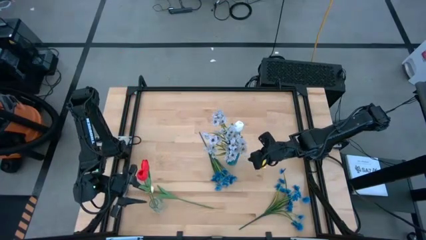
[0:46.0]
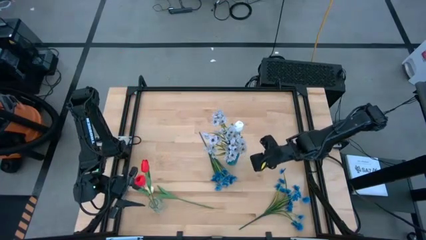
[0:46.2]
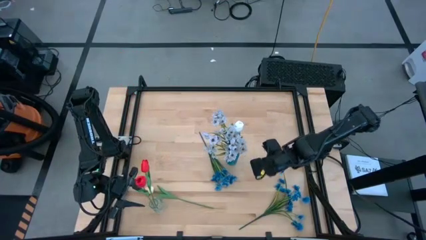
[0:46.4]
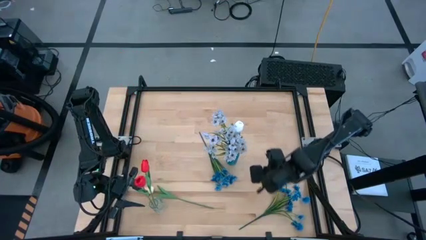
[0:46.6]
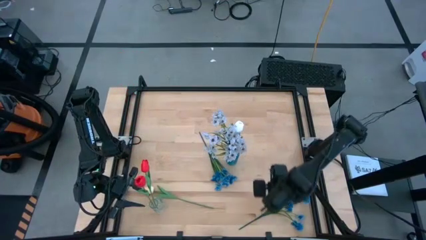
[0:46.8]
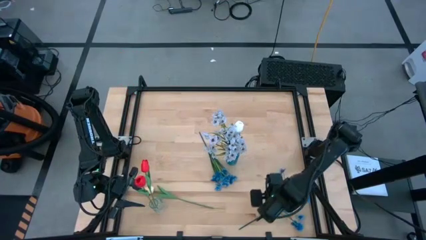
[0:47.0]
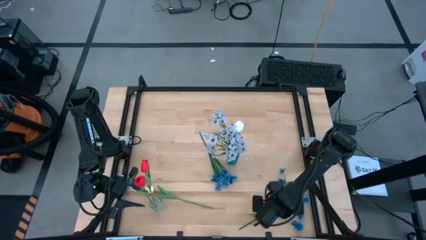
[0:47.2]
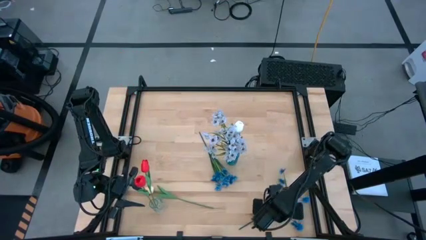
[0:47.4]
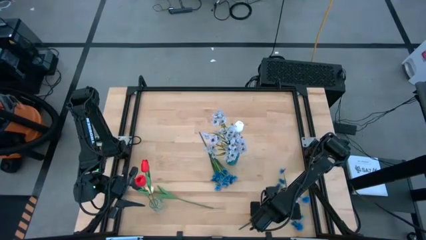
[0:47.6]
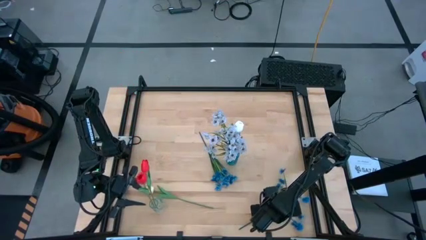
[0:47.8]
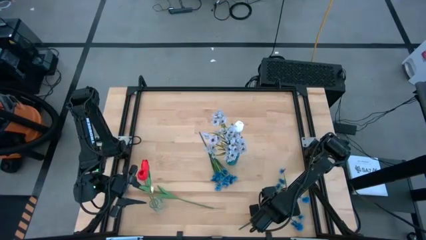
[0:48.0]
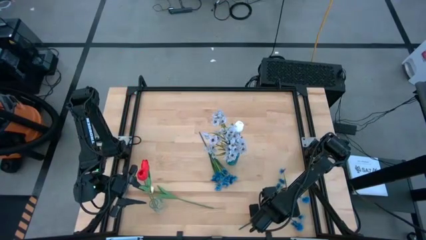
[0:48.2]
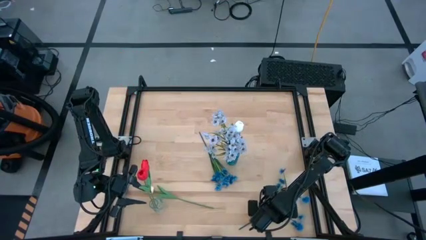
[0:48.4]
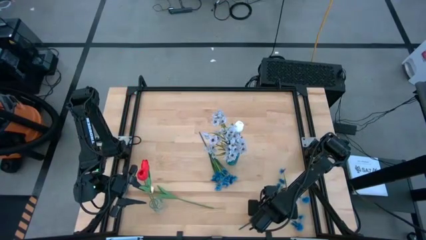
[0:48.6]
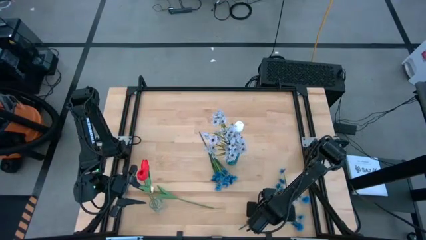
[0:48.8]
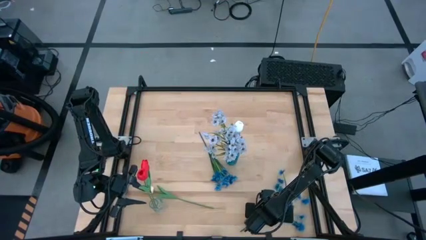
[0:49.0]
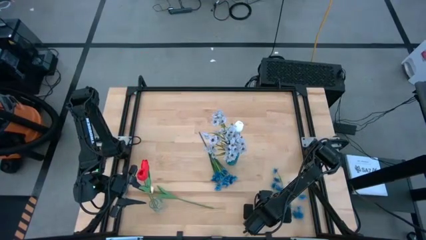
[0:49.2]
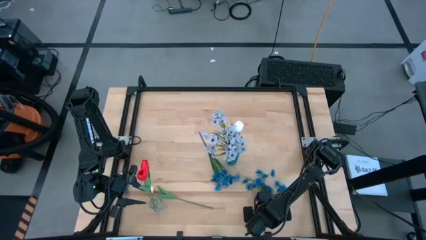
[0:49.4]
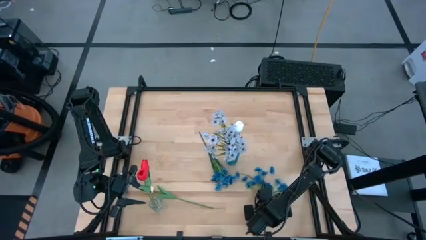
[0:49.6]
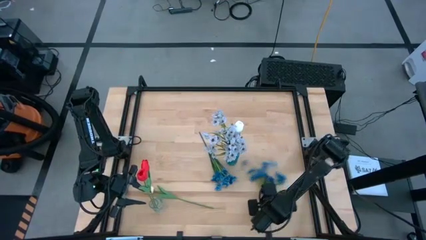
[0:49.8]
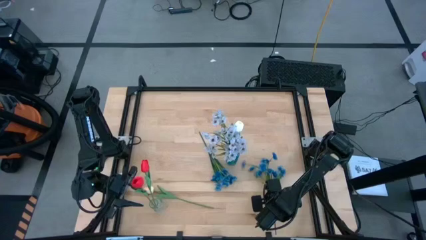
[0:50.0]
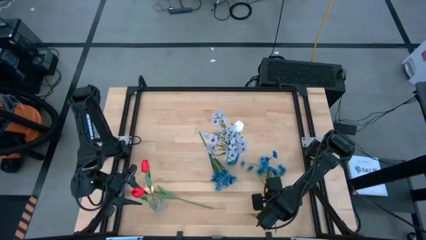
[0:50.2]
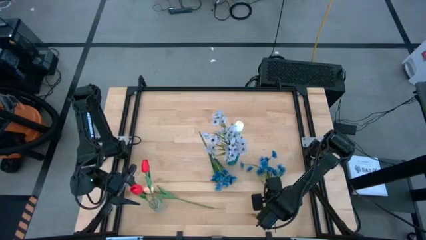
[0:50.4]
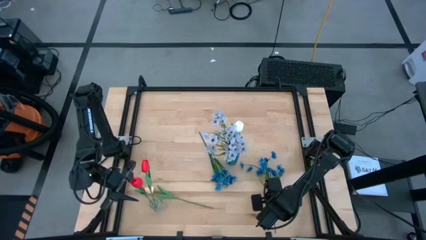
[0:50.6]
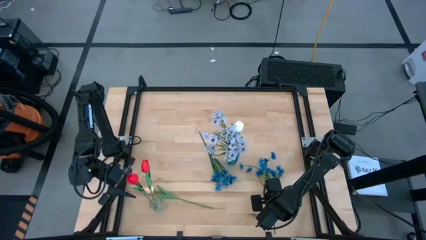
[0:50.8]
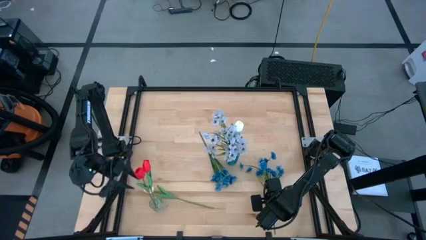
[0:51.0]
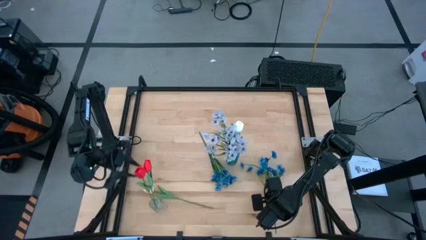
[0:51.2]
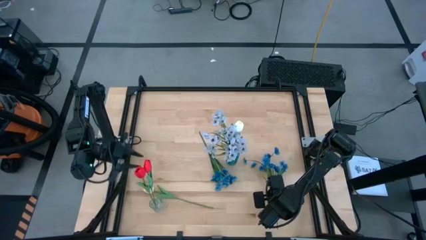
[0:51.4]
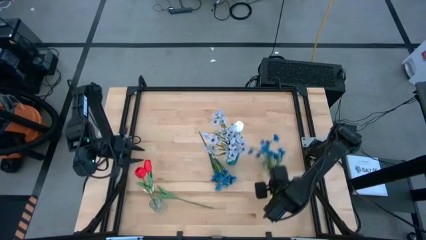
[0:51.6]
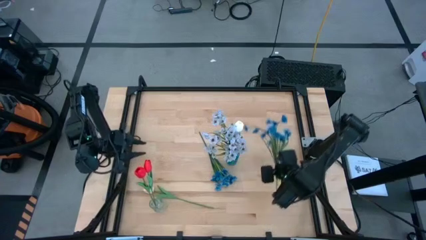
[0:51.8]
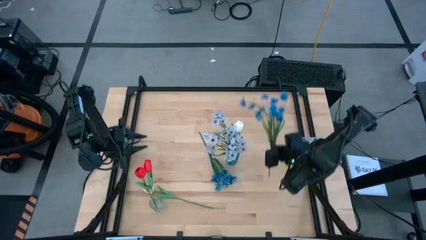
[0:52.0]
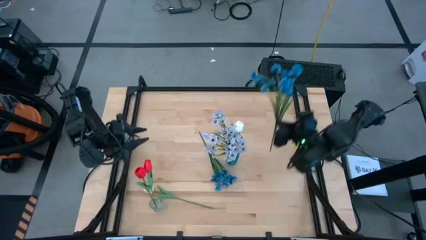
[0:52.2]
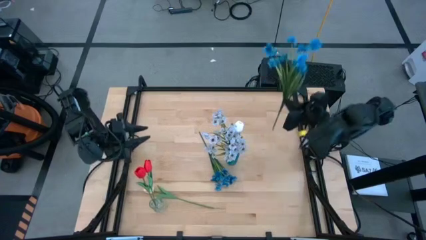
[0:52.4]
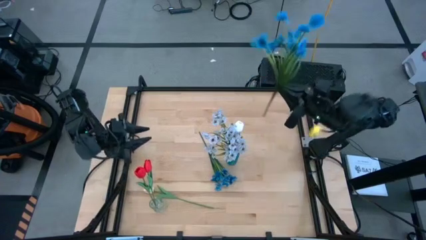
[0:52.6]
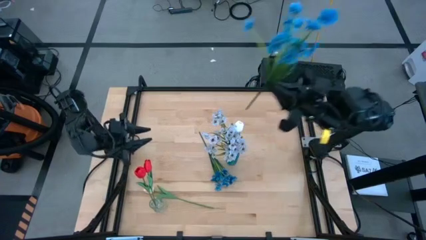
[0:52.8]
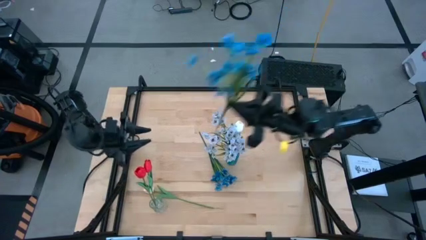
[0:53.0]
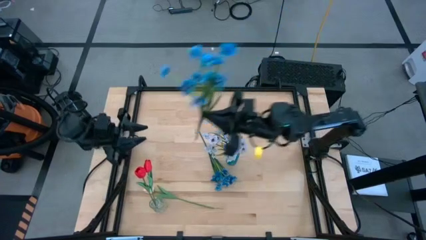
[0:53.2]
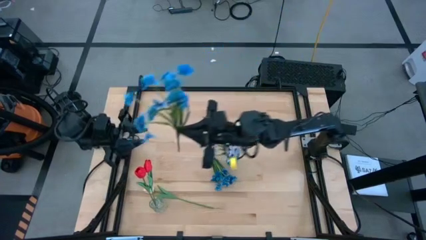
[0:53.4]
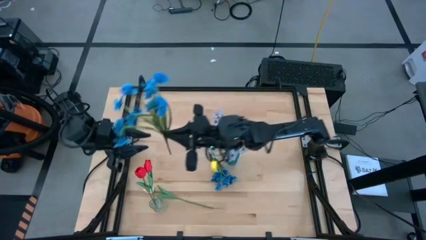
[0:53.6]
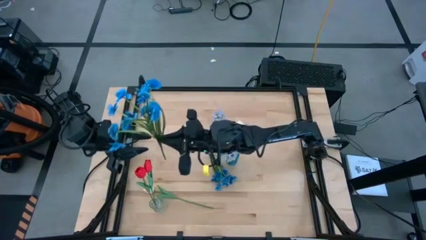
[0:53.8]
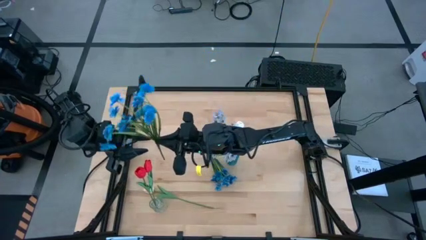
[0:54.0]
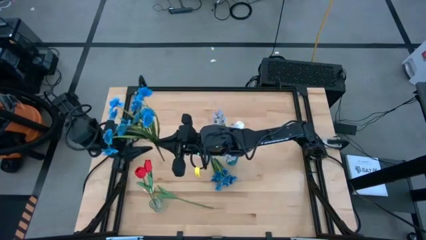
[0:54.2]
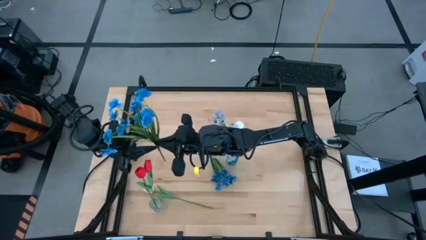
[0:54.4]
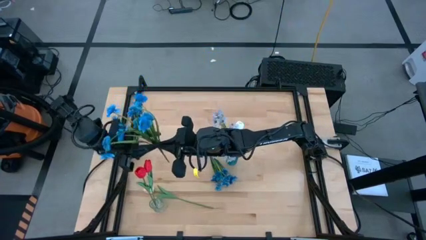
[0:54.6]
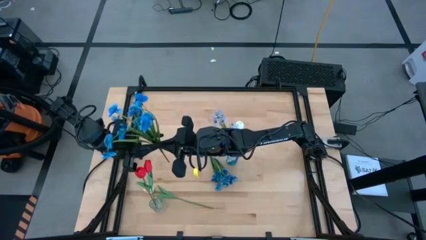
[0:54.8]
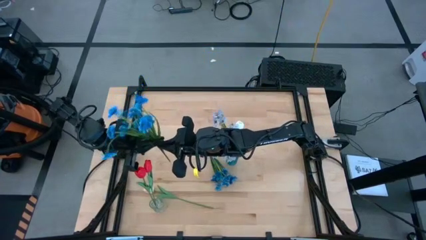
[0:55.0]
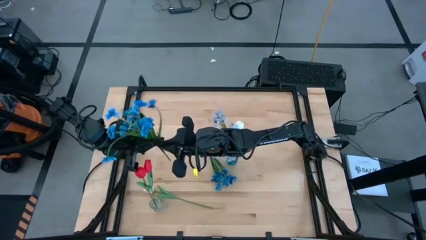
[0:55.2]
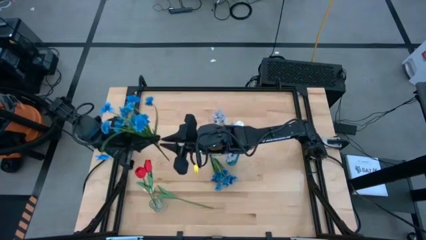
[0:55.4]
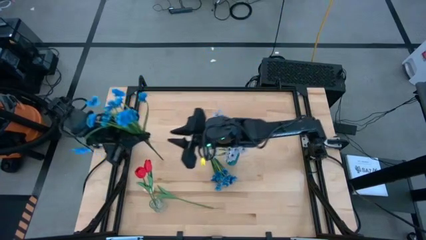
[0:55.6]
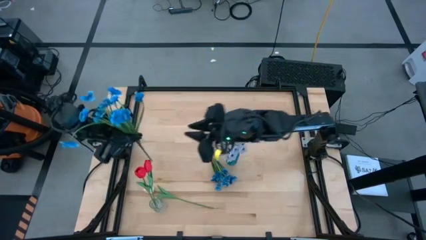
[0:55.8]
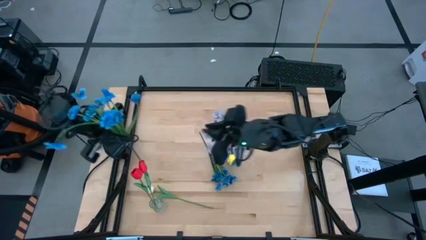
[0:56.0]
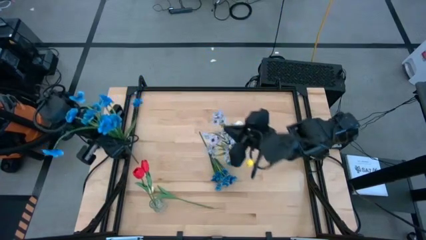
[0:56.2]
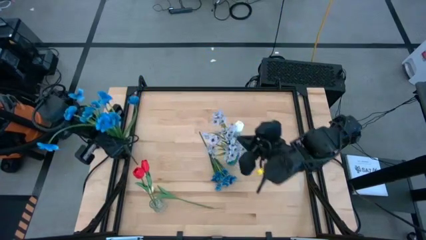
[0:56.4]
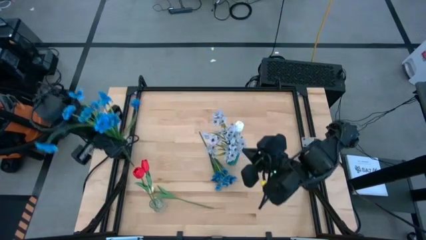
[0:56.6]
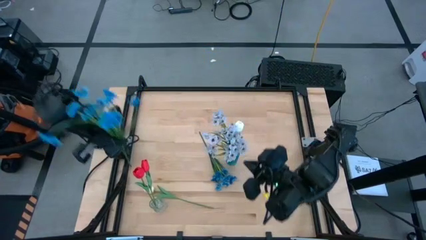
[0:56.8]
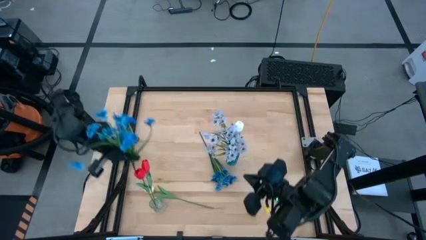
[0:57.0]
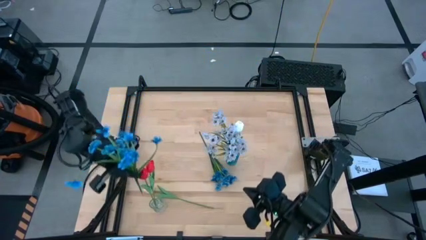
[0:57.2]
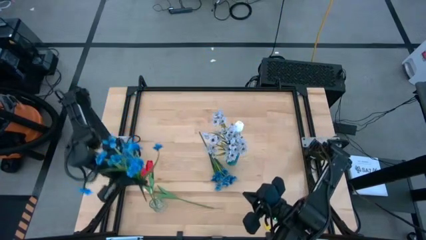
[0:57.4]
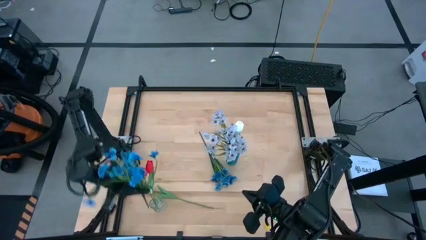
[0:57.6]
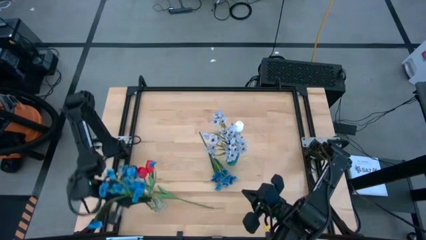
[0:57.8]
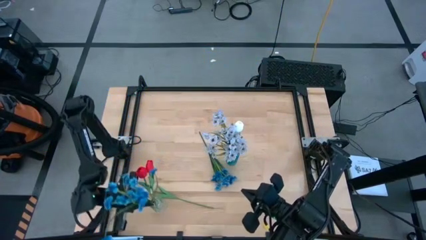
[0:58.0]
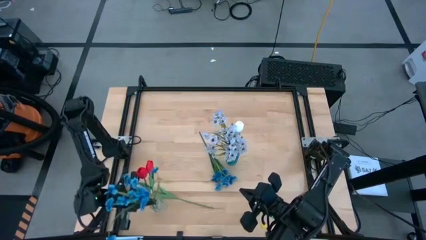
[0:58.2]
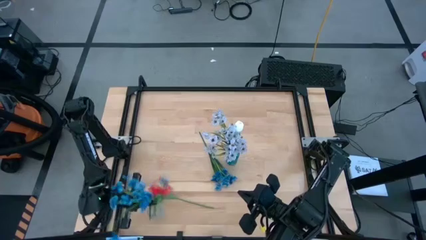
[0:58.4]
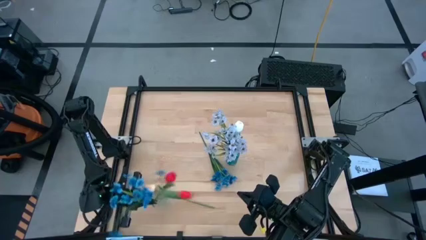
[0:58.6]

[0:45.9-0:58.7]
Task: Sort flowers into vase by color
Put the bottom blue flowers into the transparent flower vase

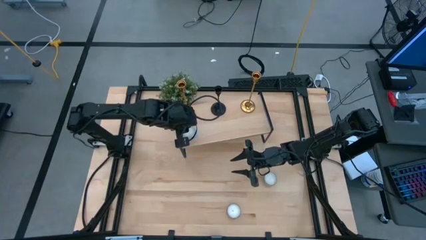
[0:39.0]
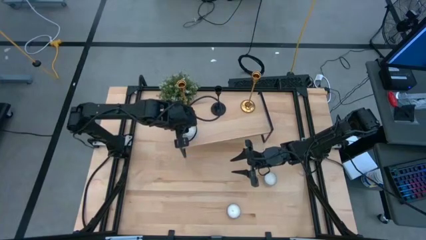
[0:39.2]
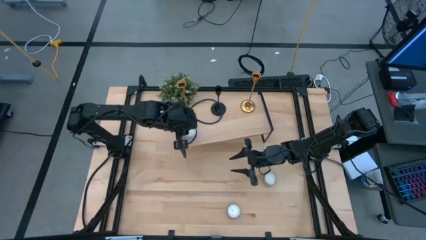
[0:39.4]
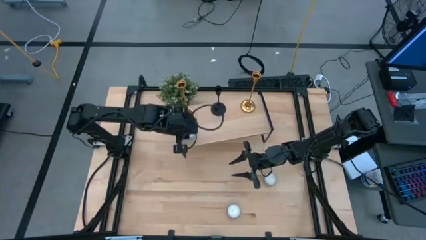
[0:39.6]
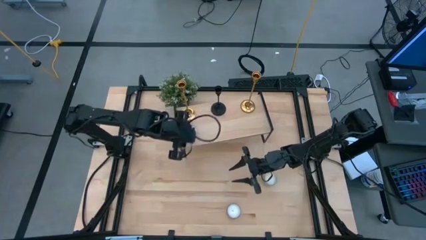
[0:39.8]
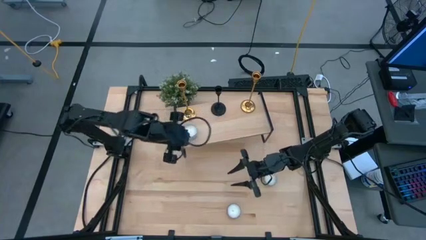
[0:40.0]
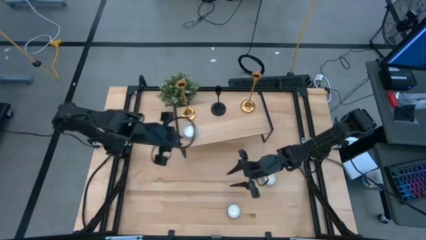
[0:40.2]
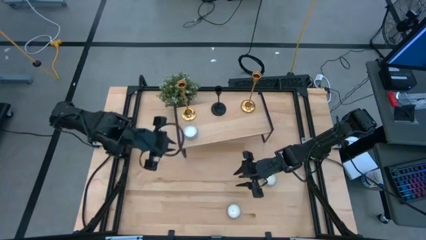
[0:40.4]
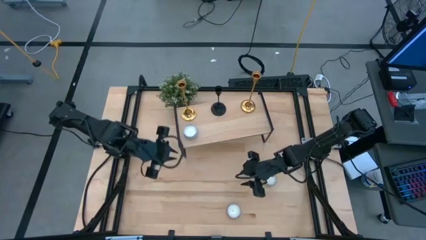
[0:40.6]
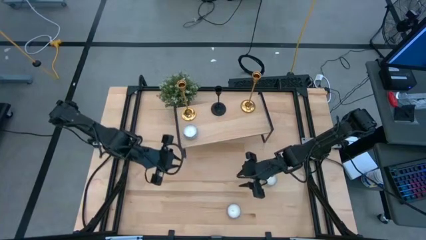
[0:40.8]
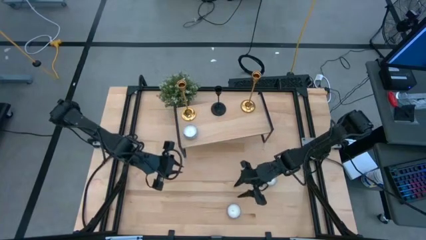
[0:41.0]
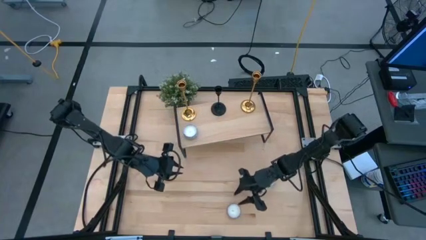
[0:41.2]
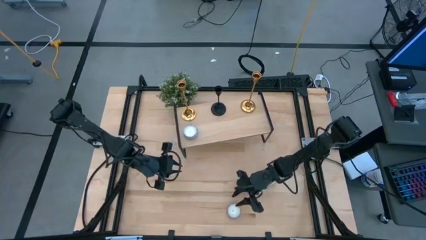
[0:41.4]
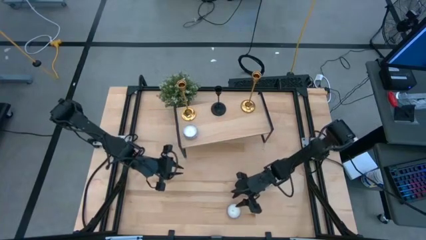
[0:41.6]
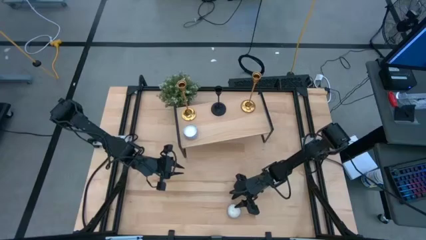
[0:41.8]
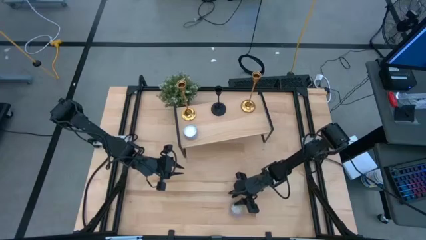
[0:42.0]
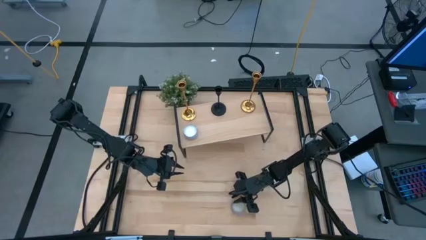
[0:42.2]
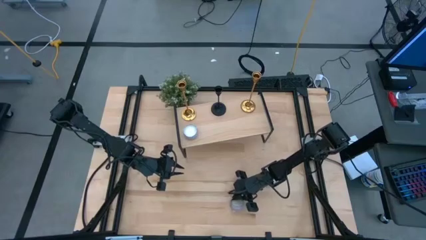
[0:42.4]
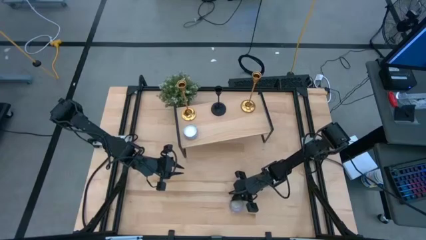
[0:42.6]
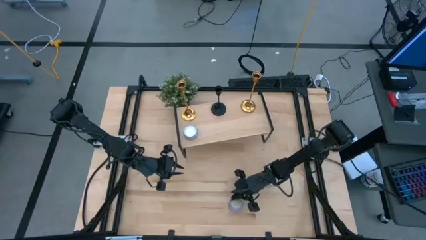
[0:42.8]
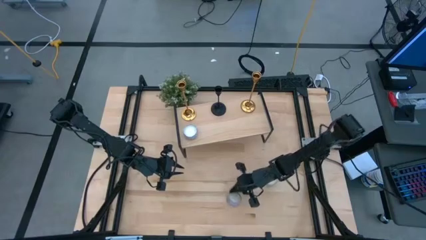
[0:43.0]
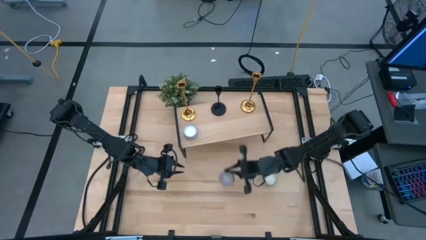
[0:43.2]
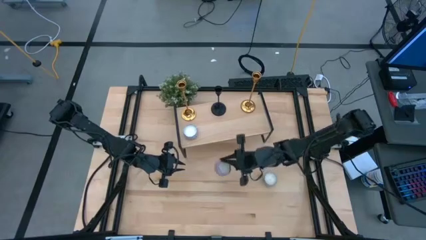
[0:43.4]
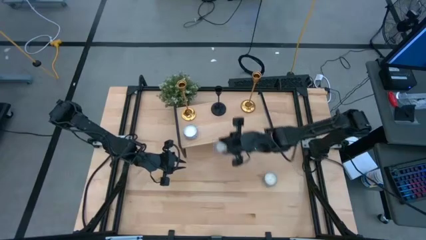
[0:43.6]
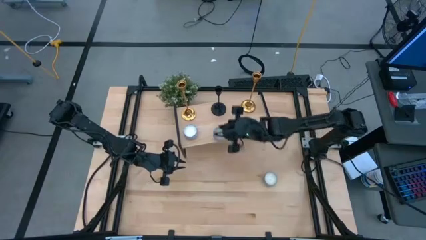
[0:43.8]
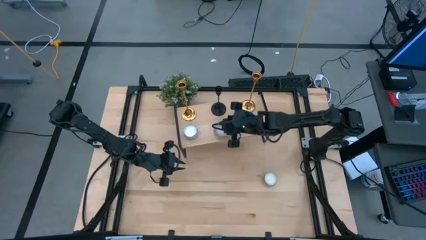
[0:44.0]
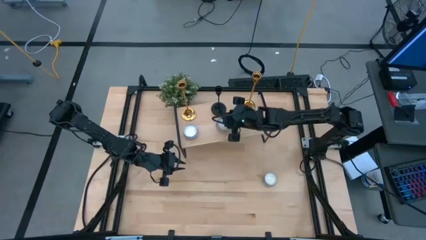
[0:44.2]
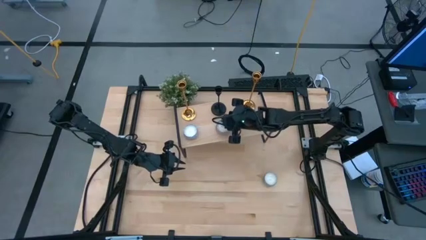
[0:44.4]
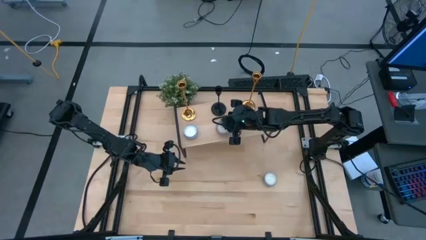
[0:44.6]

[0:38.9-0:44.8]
Task: Pick & Place candle stick holders
Put the pink scented candle on the shelf
